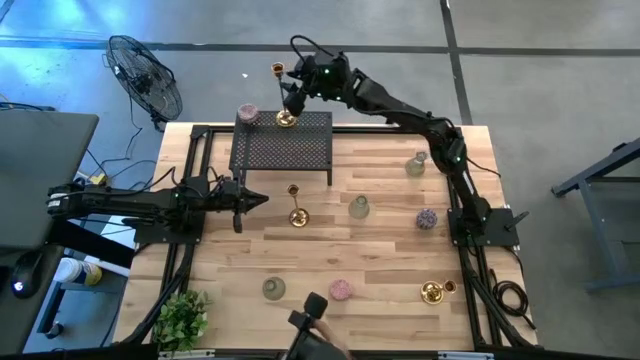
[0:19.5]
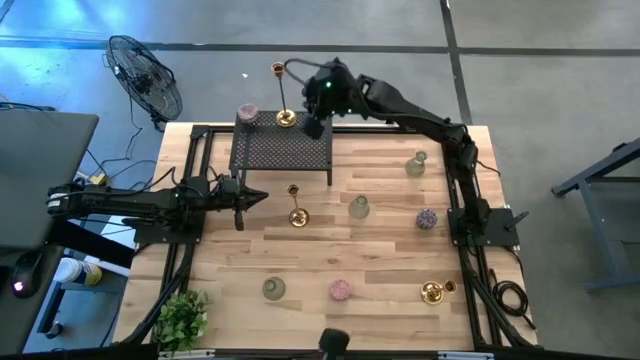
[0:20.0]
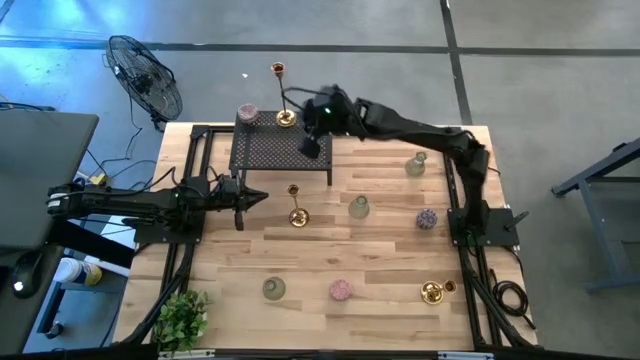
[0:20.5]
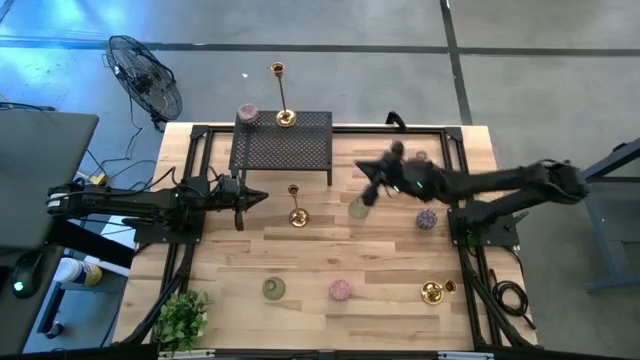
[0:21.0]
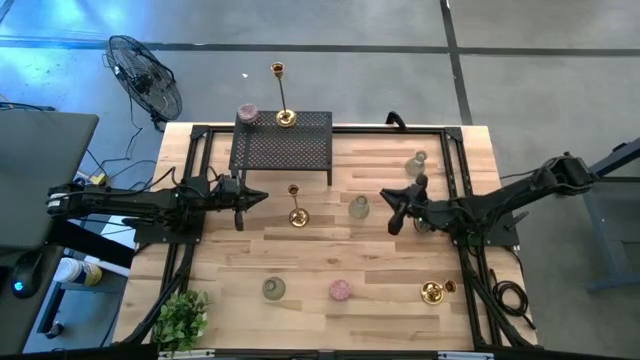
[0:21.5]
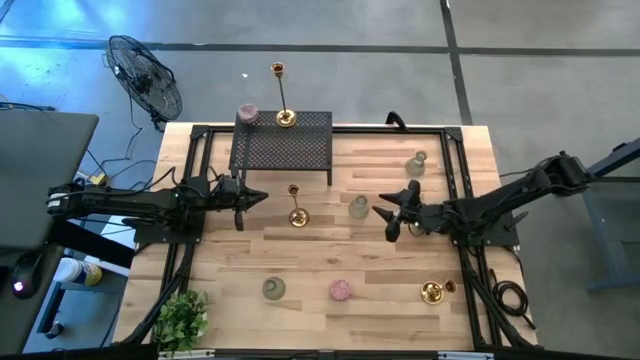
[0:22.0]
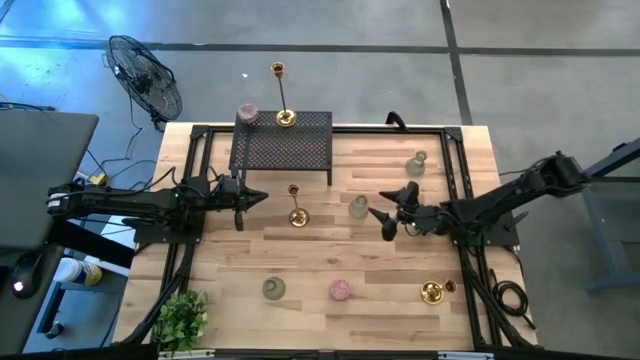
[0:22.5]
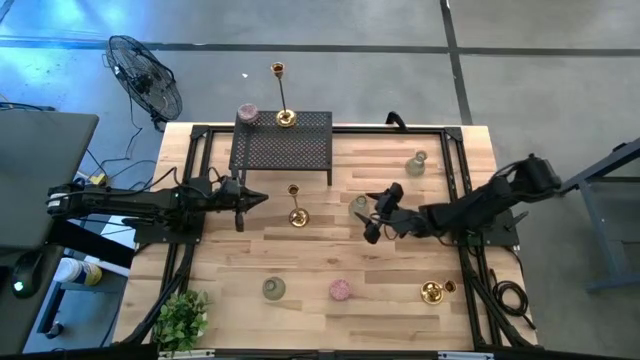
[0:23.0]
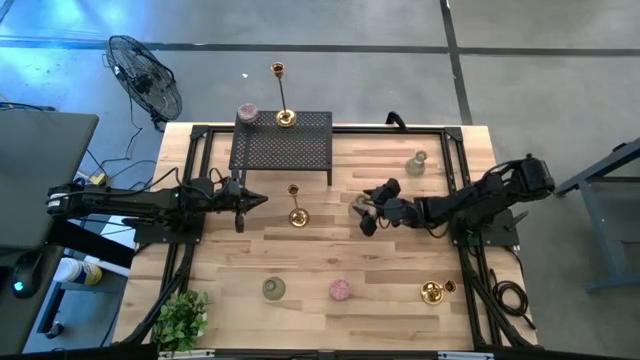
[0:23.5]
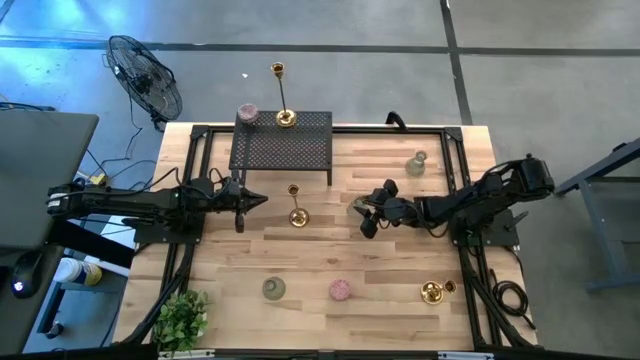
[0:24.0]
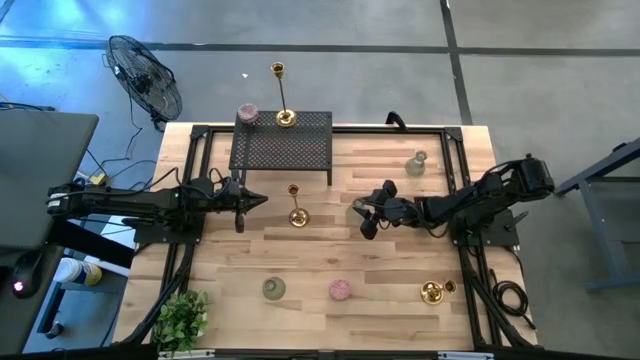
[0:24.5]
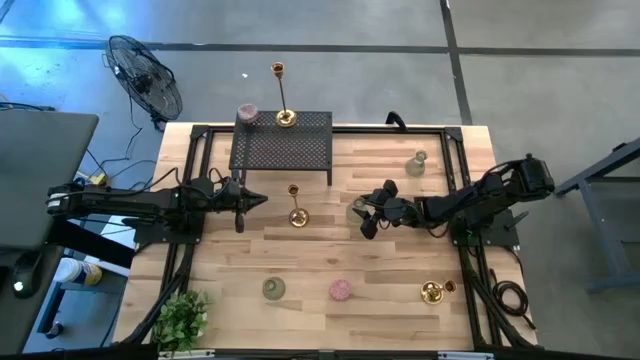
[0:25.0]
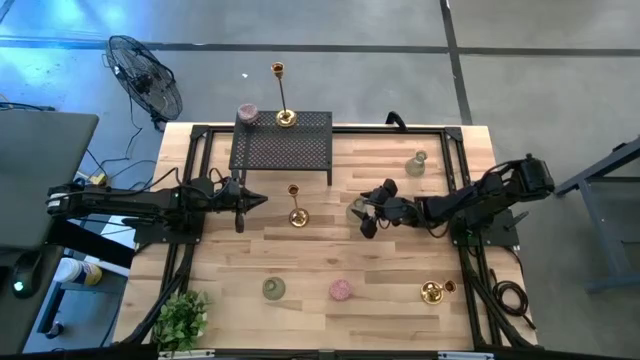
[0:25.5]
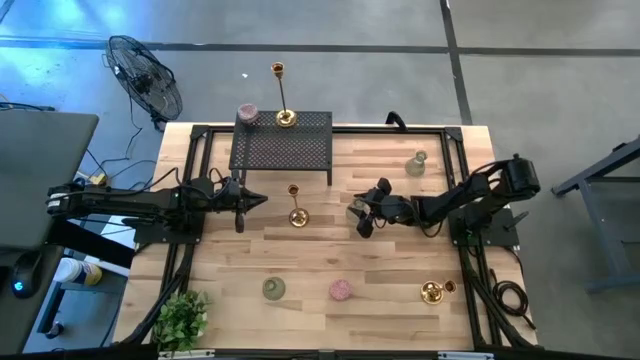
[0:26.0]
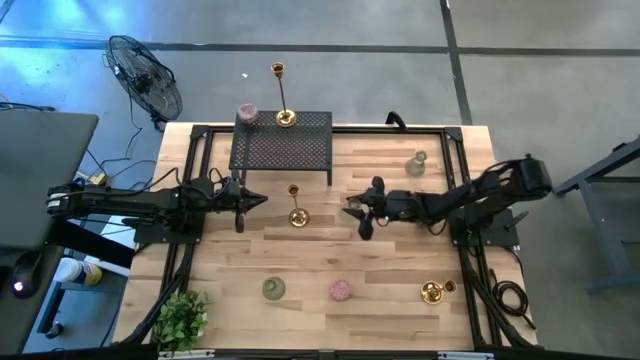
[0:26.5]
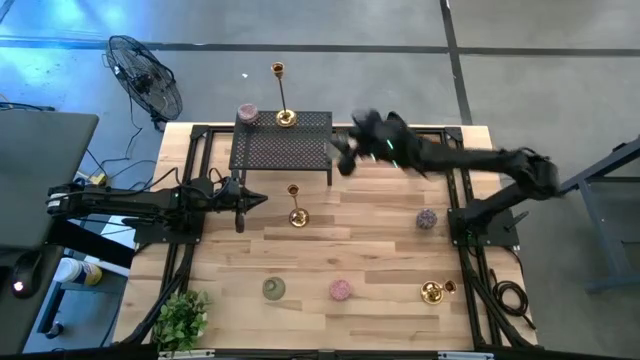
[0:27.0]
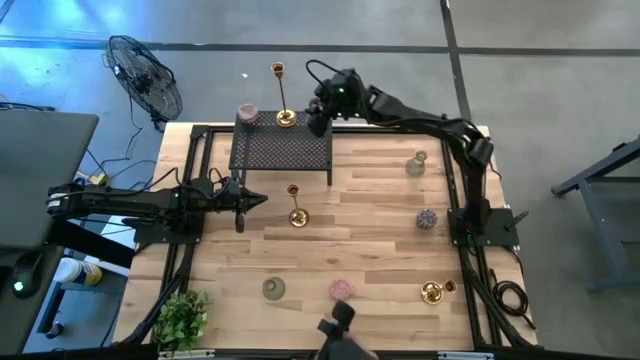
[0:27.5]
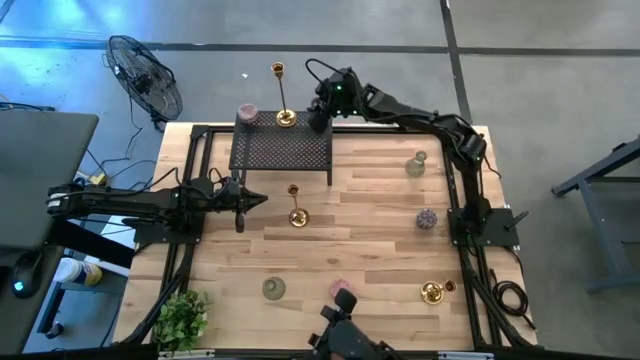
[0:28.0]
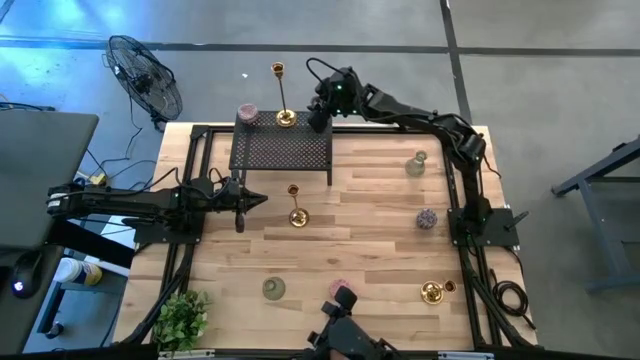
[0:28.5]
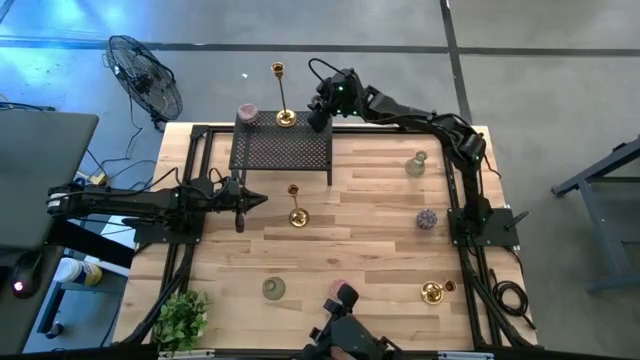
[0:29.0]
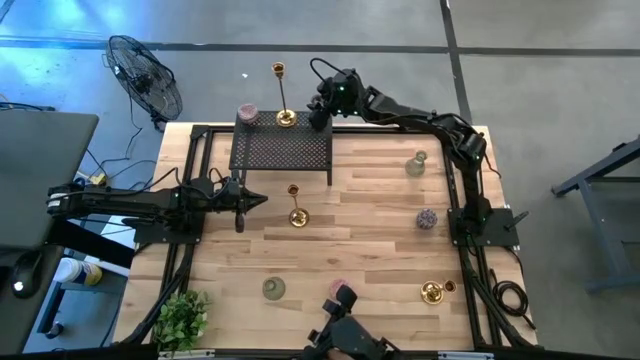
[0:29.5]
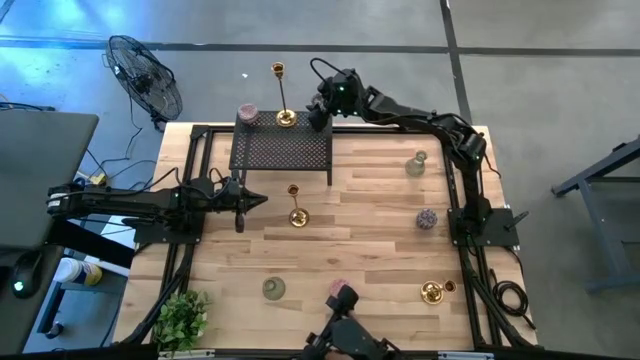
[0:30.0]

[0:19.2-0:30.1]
Task: Pick & Place candle stick holders
Put the middle green glass candle holder on the shelf

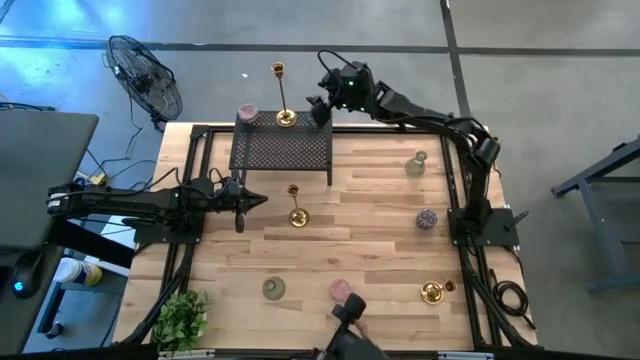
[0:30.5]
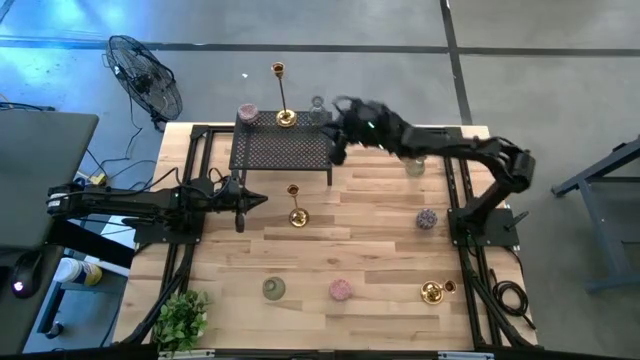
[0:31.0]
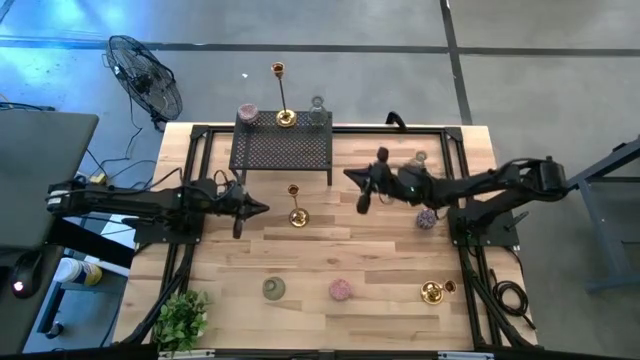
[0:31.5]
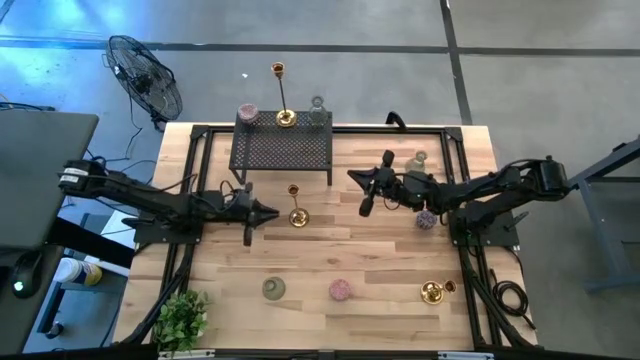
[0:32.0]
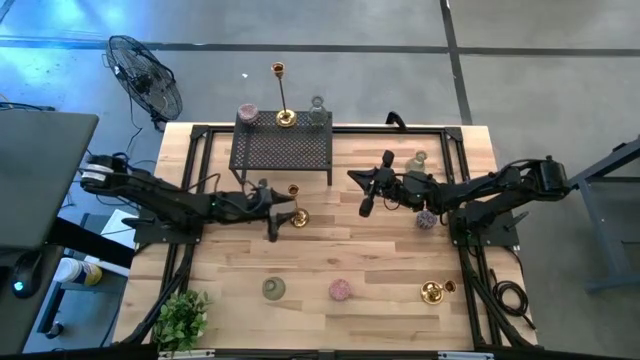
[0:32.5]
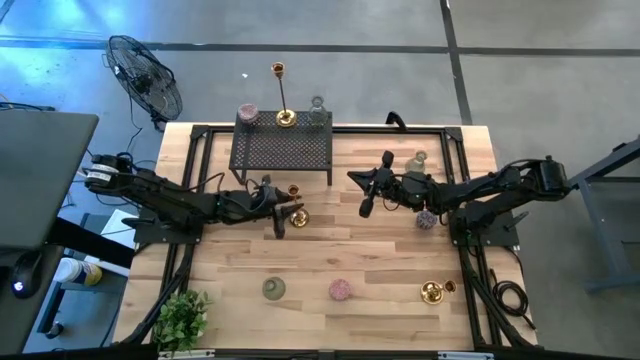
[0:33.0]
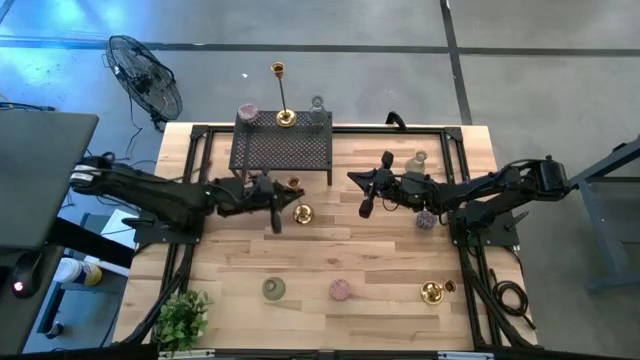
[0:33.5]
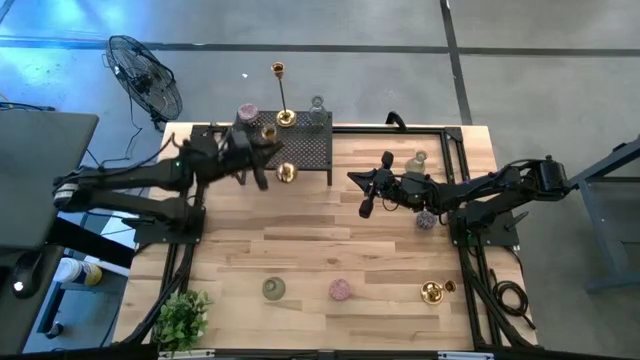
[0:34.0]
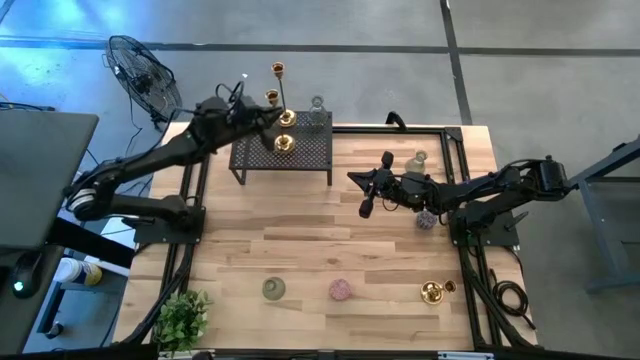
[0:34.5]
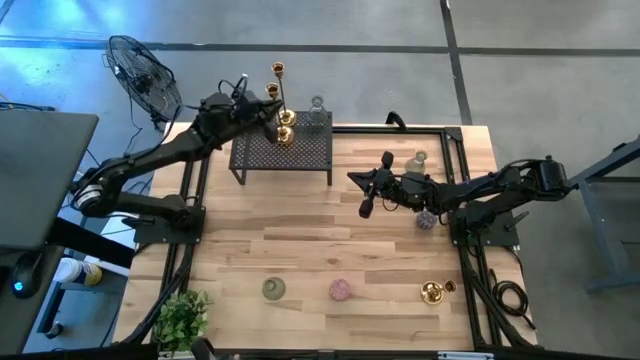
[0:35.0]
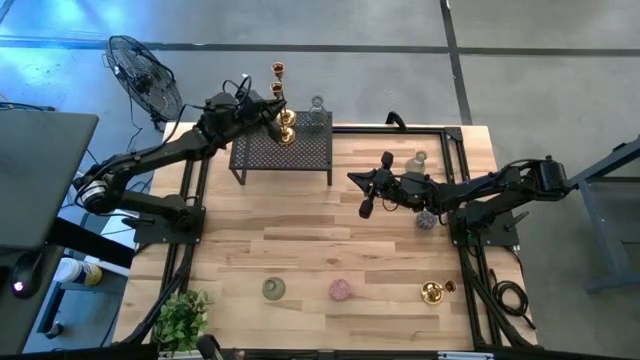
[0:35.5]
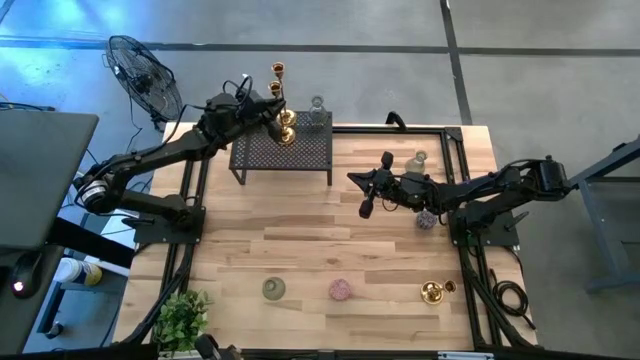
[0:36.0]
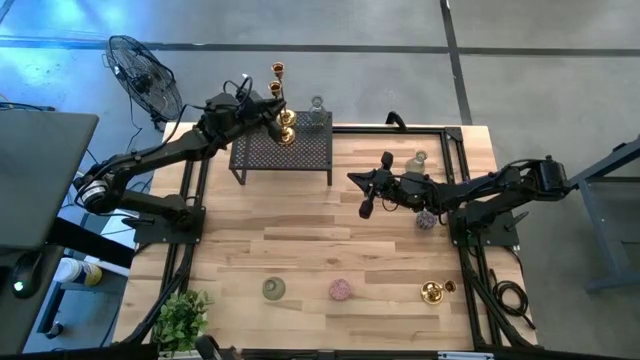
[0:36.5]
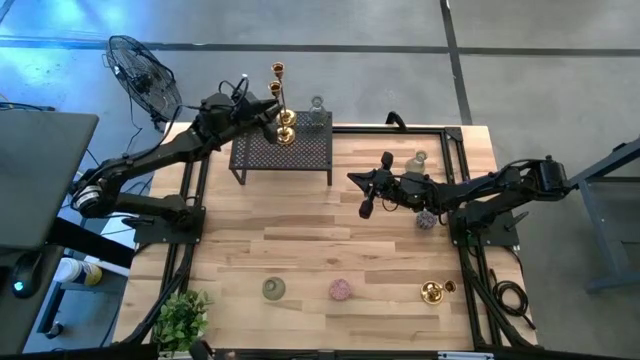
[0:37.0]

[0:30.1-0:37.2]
Put the left gold candle holder on the shelf aligned with the other gold candle holder

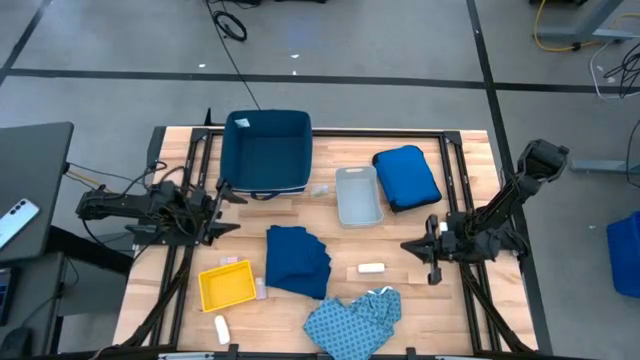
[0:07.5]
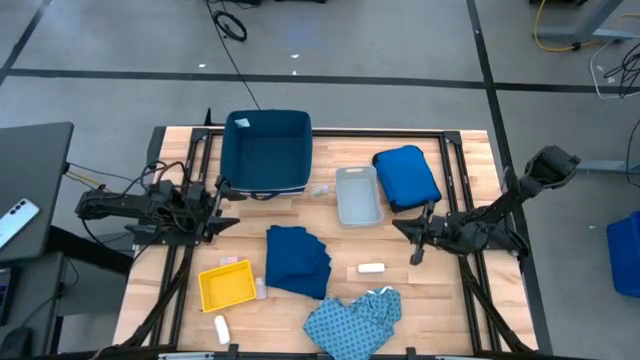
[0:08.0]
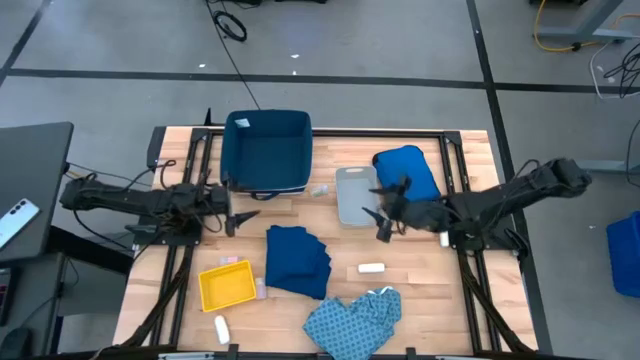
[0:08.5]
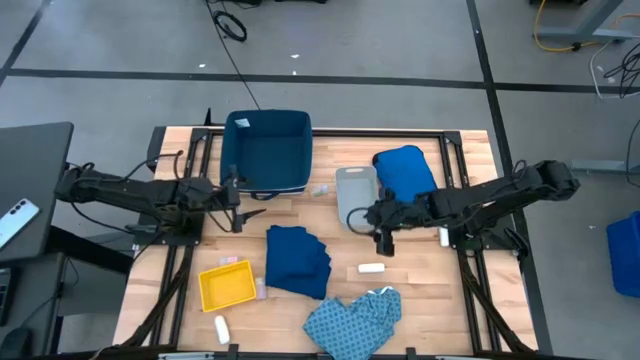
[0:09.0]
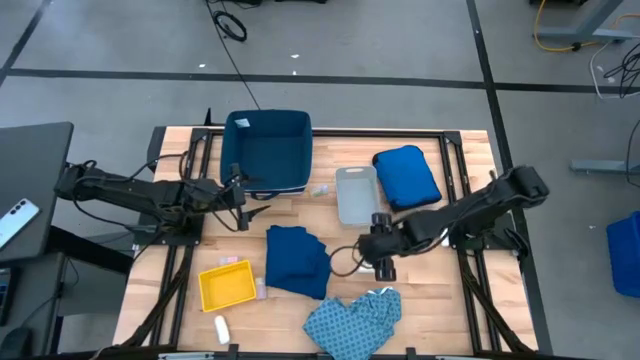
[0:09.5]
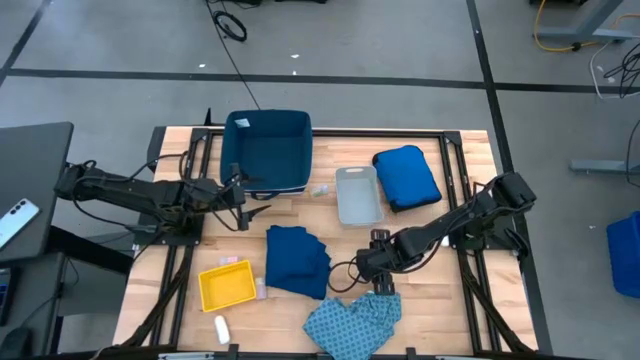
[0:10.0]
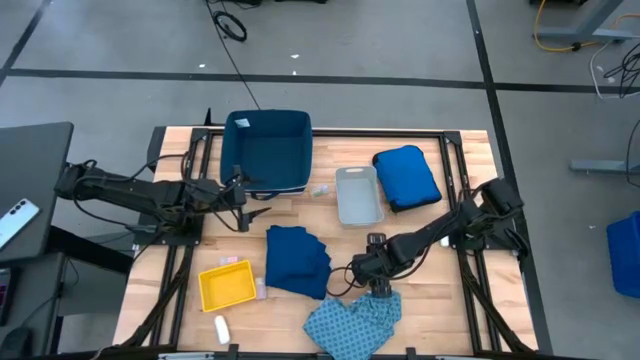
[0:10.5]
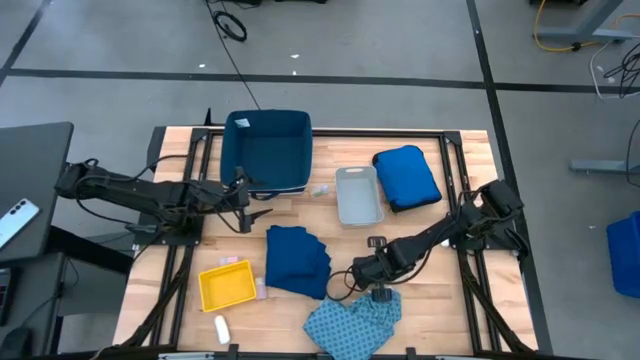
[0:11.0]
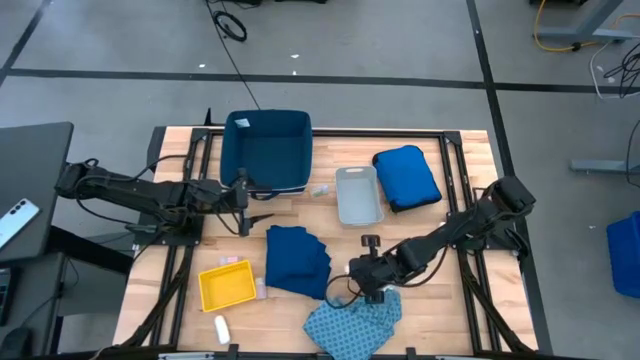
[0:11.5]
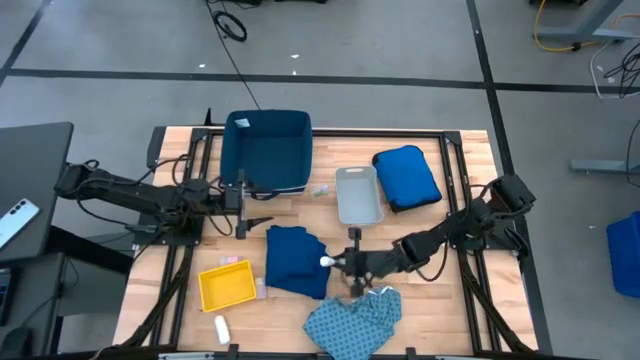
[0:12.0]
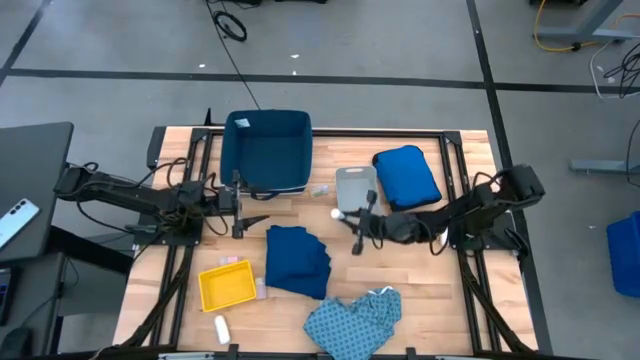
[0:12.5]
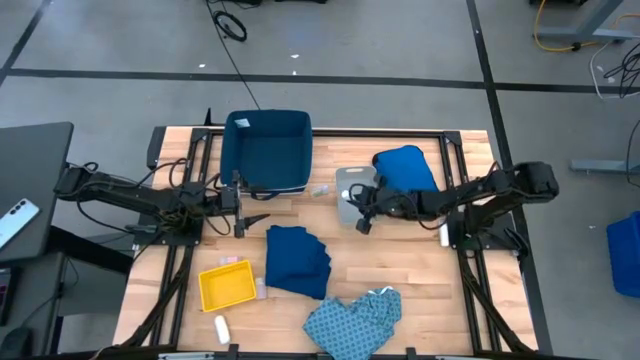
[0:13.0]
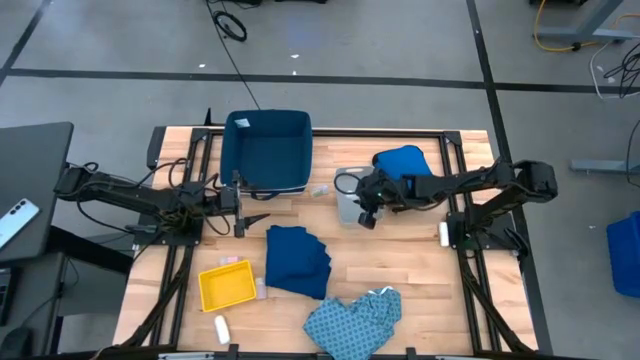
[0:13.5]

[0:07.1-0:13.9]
Task: Pick & place medical supplies in basket/bin
Put the middle white rolled gauze into the gray bin
